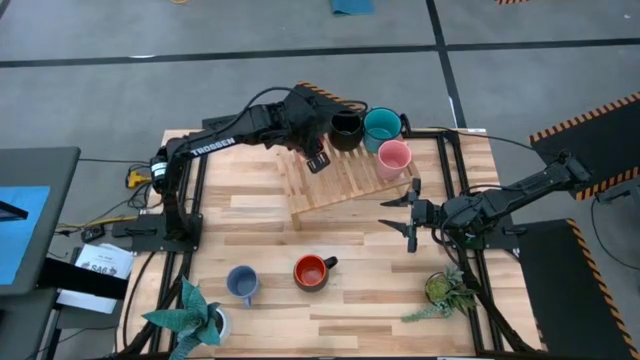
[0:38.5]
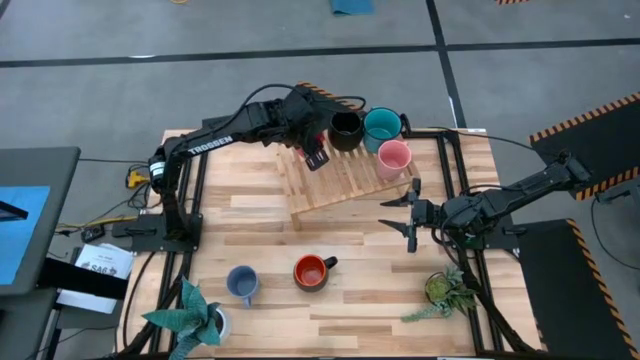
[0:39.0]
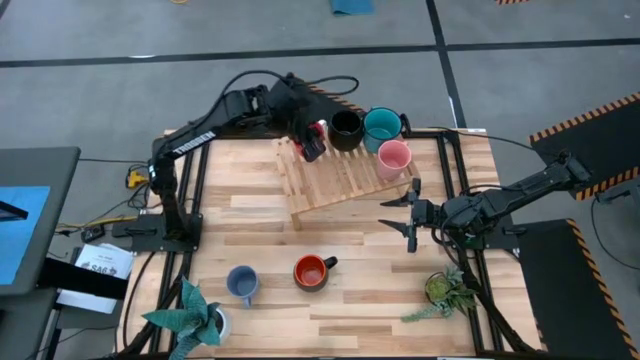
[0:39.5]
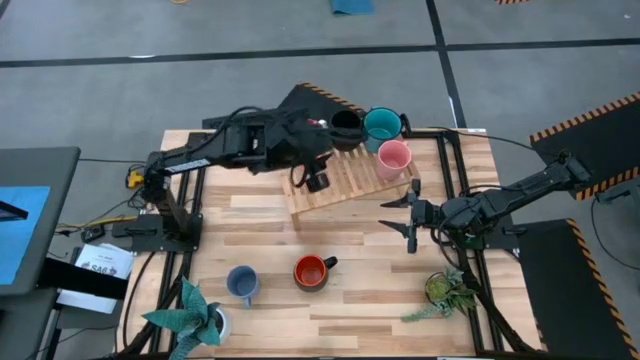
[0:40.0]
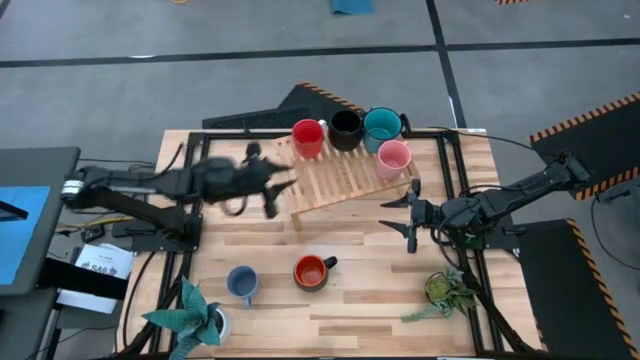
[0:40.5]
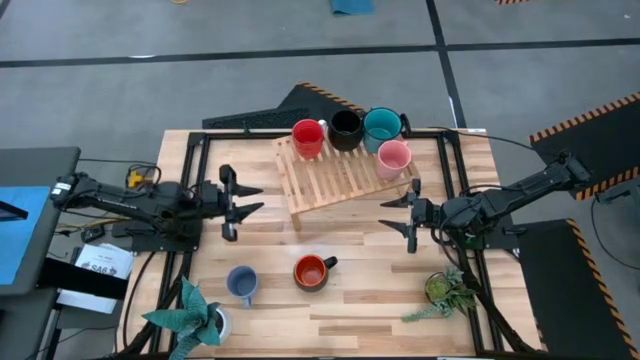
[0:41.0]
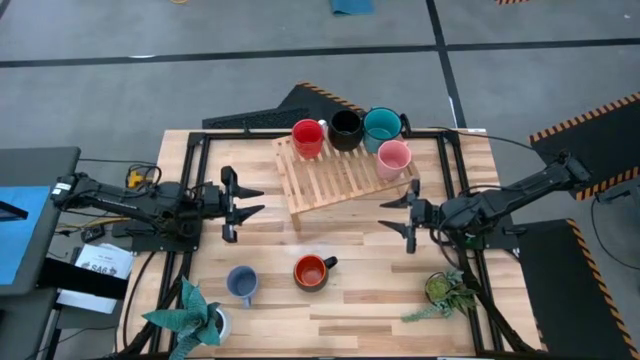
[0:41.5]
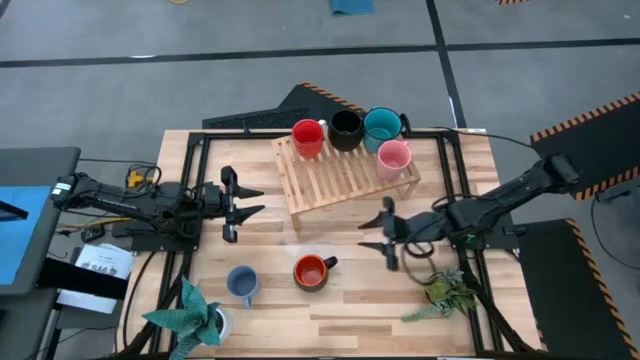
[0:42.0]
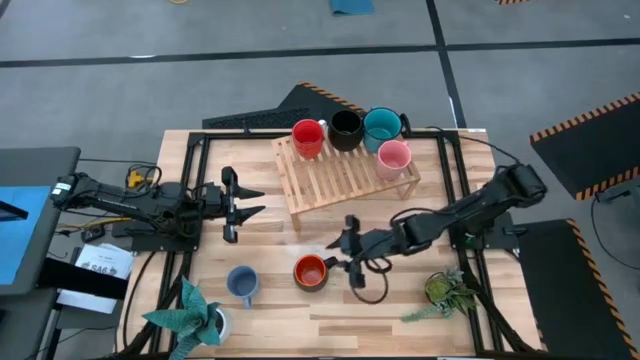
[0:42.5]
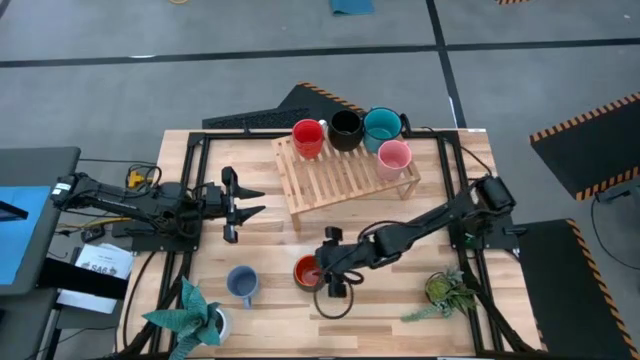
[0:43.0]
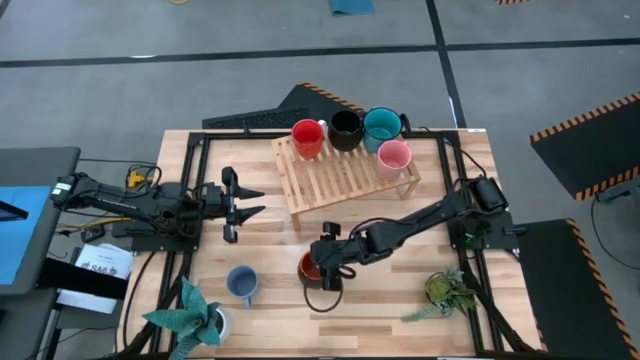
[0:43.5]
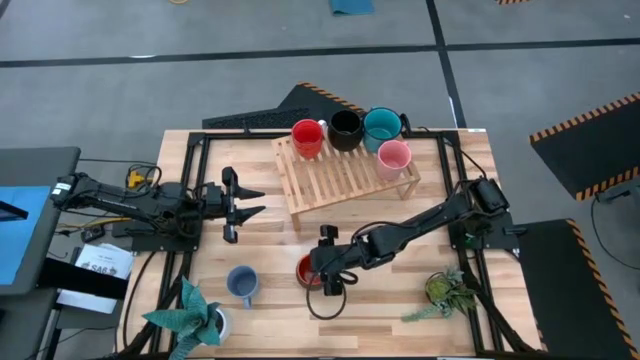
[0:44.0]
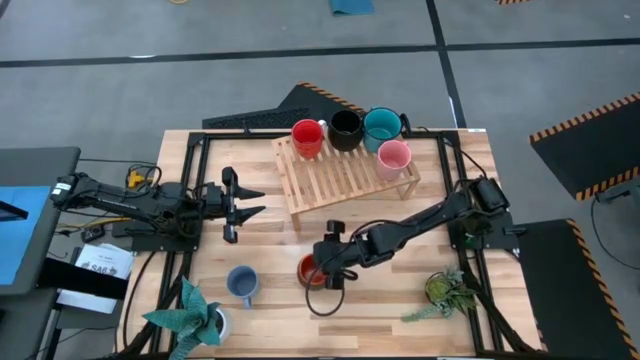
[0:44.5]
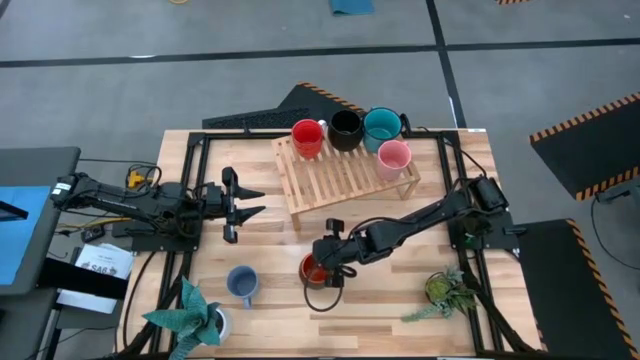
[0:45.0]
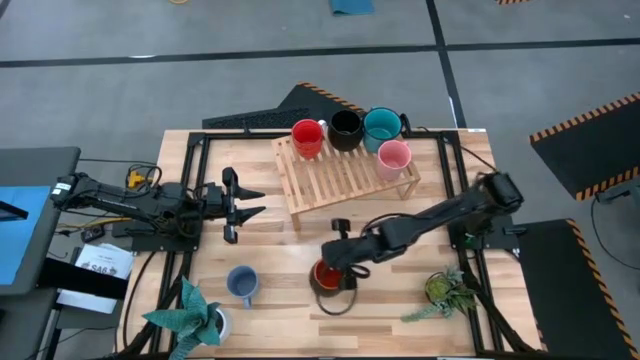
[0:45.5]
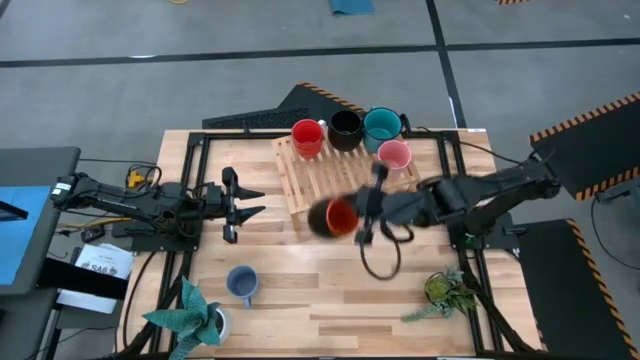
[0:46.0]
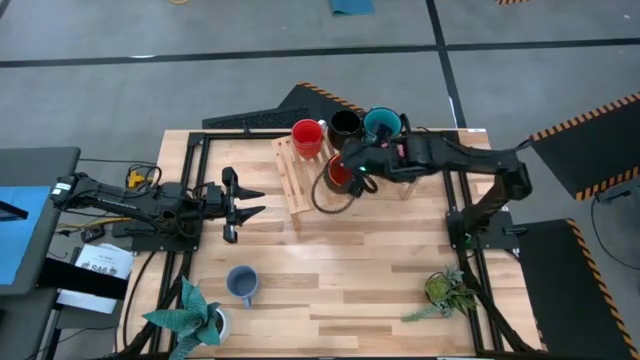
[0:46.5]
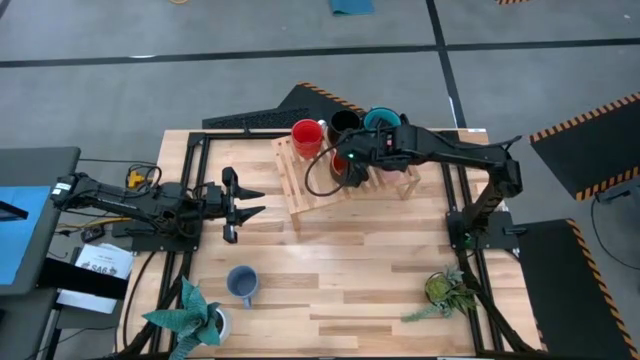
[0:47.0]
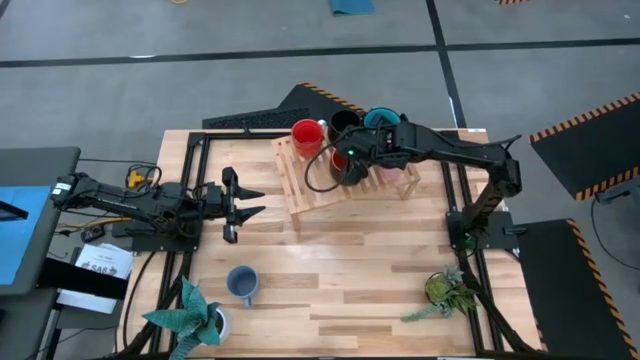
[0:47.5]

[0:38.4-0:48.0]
Task: Place coffee mugs
Put the black and orange mug on the shelf

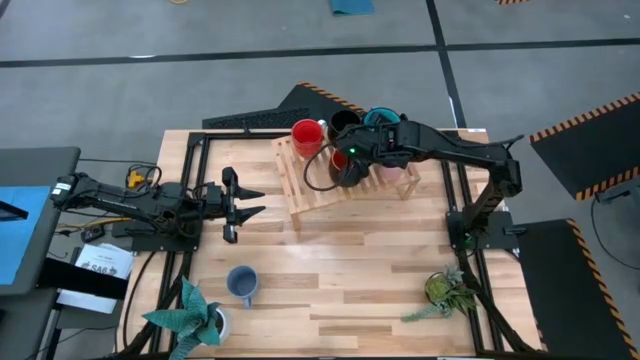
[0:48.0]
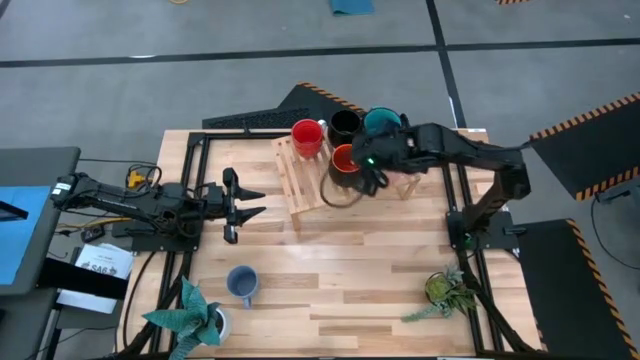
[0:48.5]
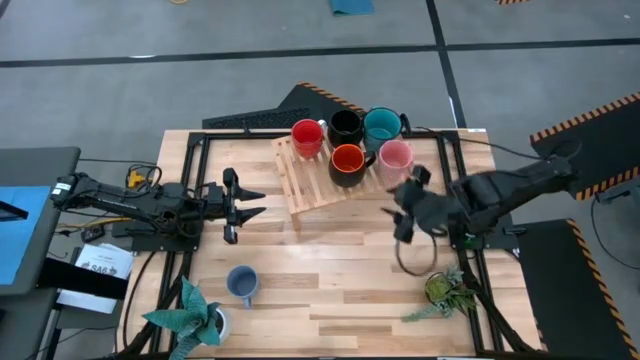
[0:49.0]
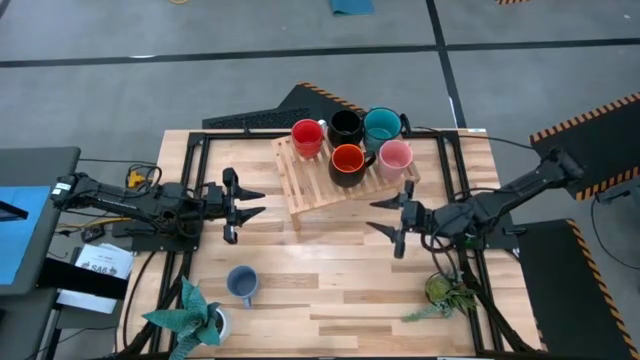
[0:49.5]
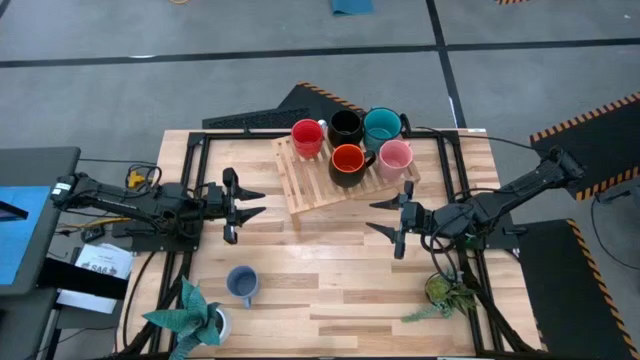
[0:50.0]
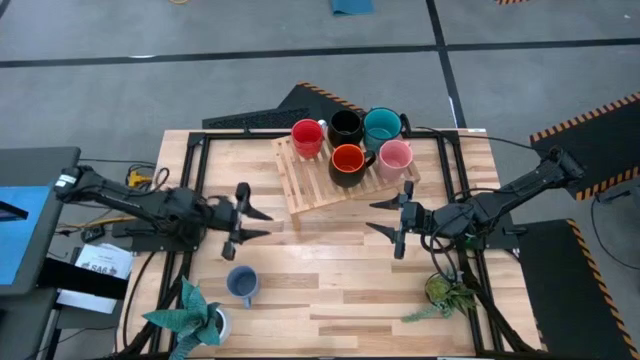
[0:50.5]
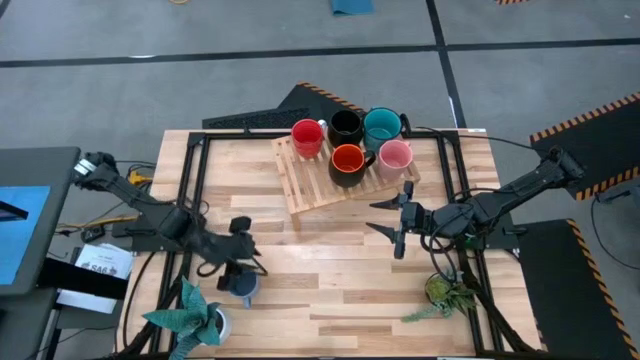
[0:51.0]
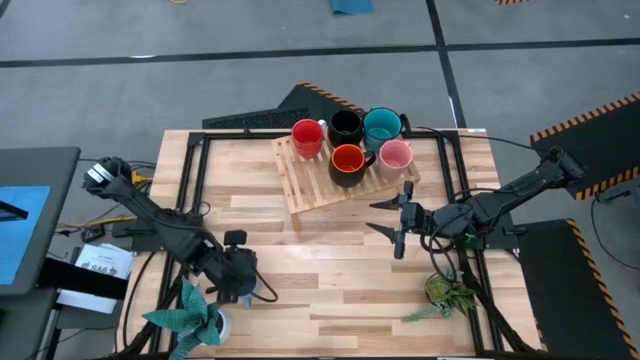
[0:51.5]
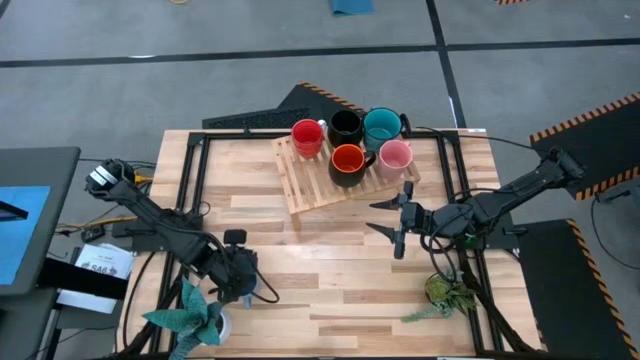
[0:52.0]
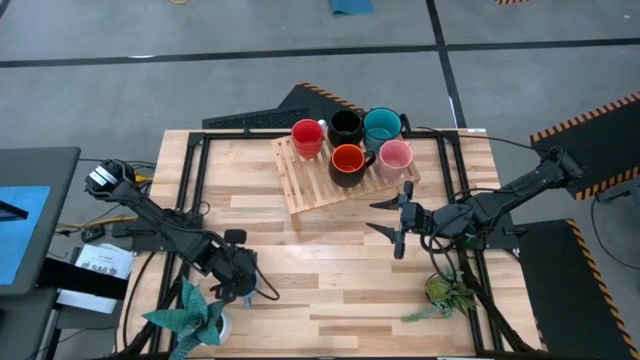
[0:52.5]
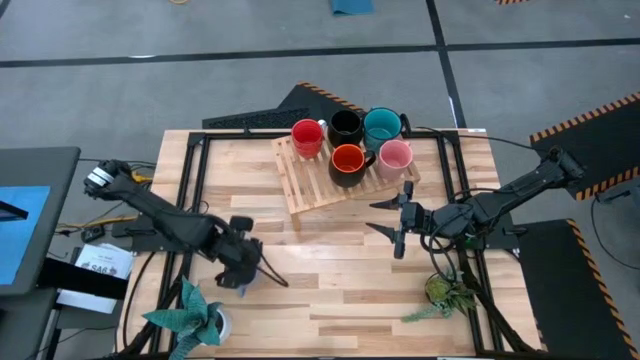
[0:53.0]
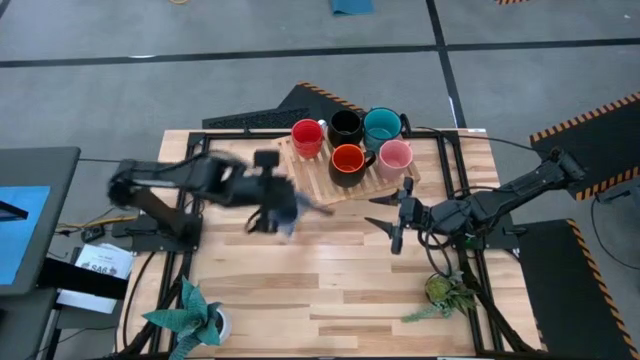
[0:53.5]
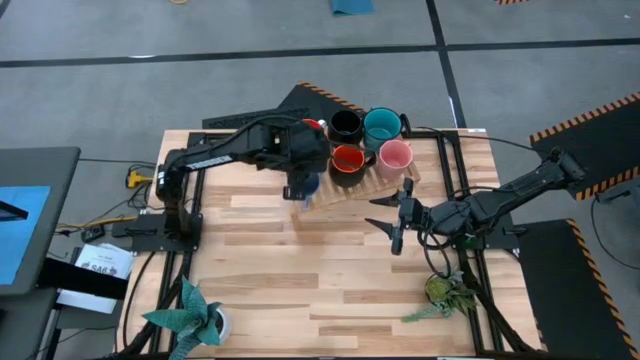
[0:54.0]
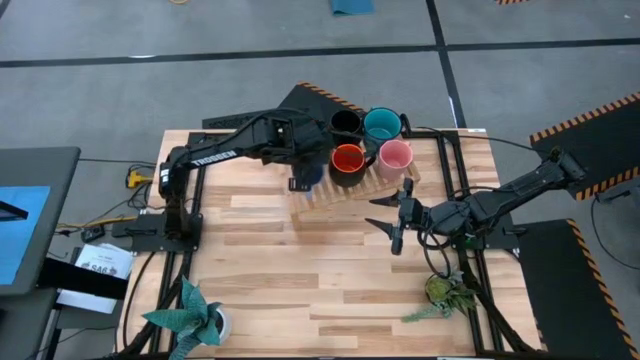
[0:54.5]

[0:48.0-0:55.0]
Put the blue mug on the shelf

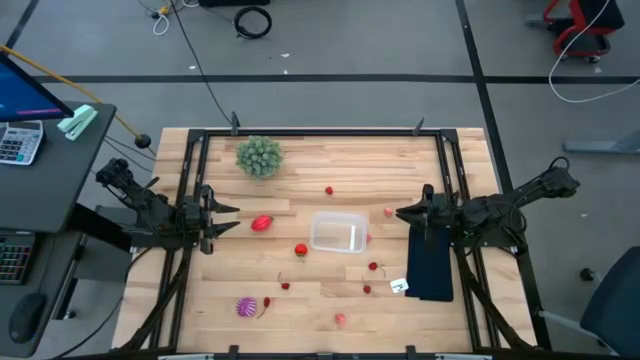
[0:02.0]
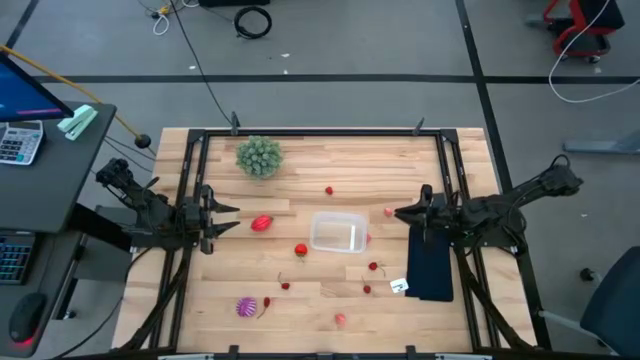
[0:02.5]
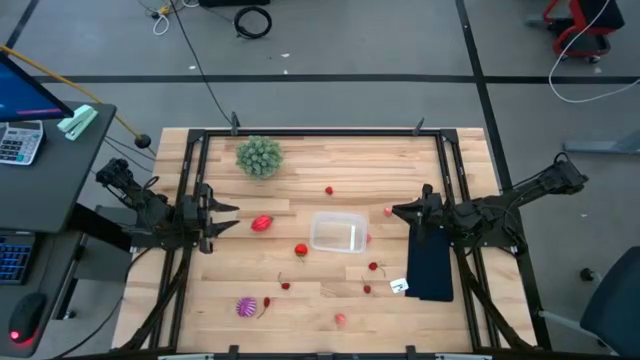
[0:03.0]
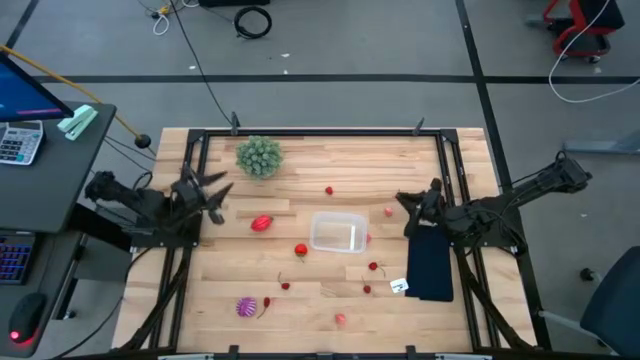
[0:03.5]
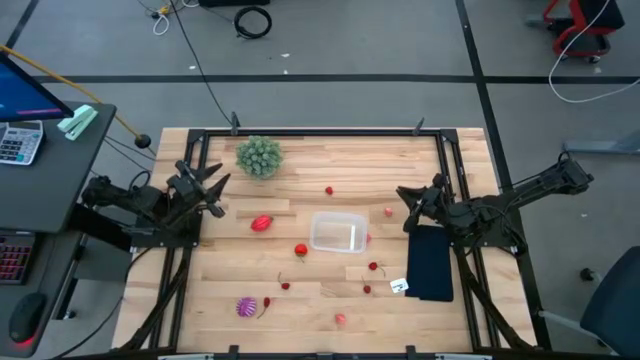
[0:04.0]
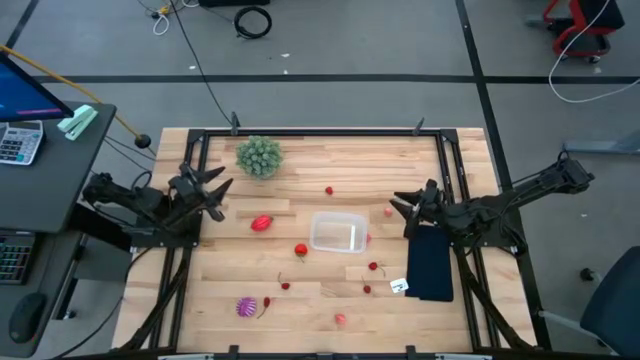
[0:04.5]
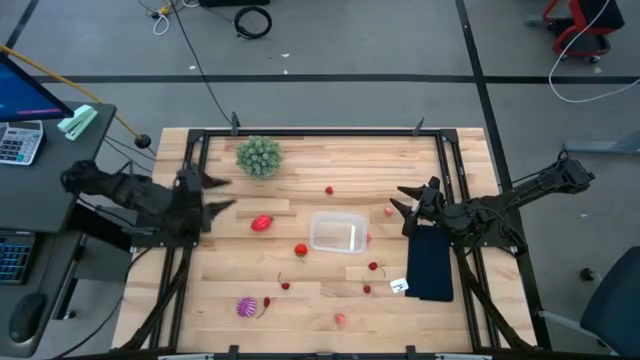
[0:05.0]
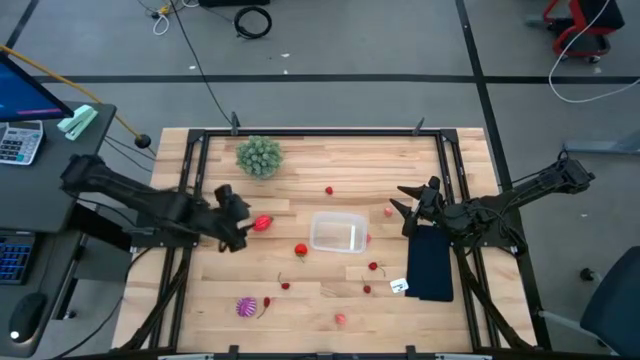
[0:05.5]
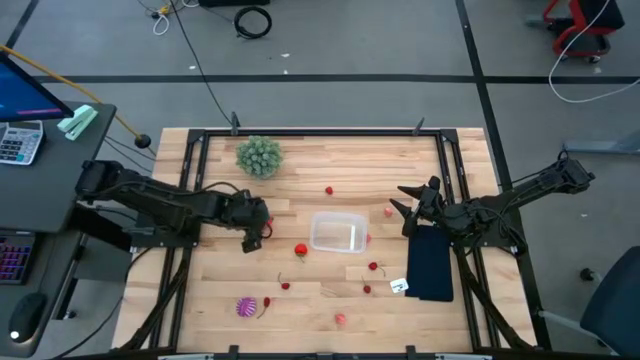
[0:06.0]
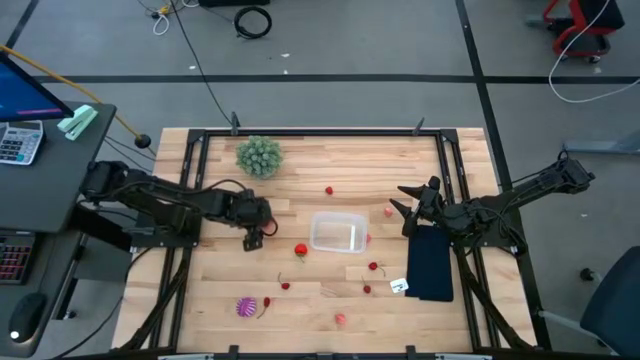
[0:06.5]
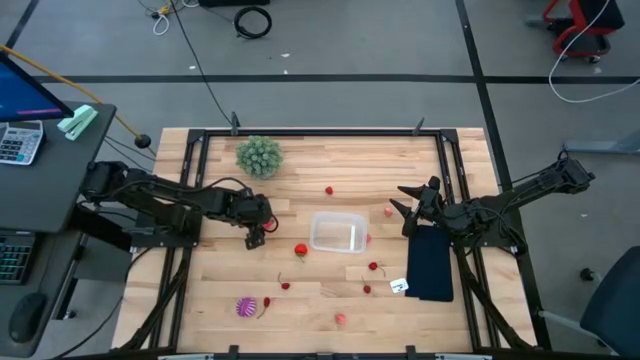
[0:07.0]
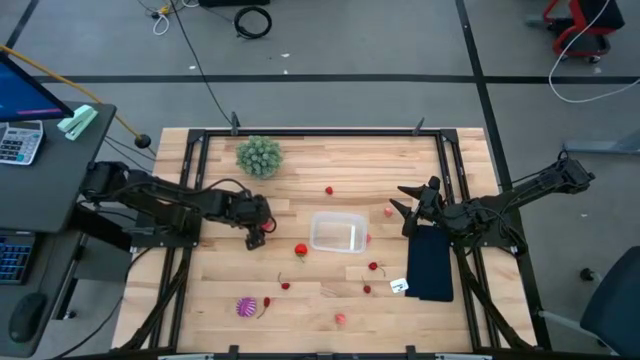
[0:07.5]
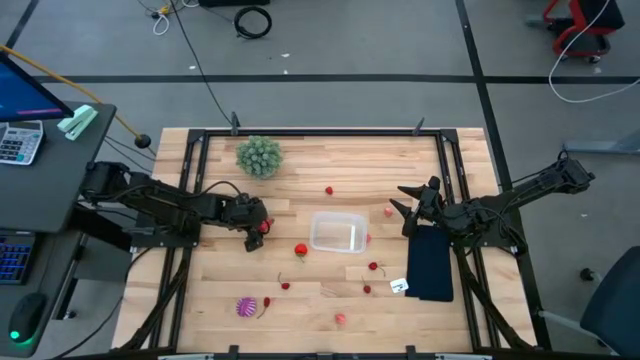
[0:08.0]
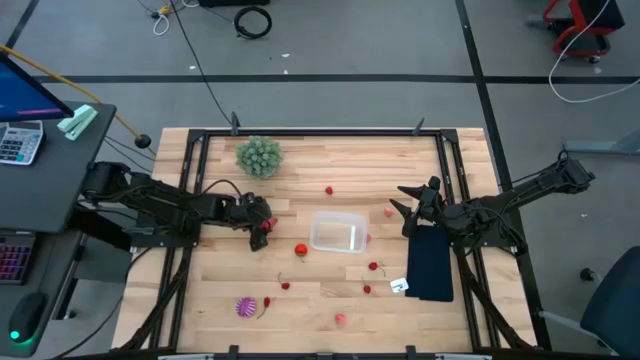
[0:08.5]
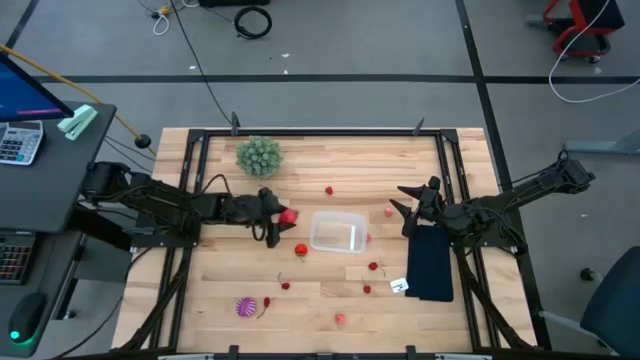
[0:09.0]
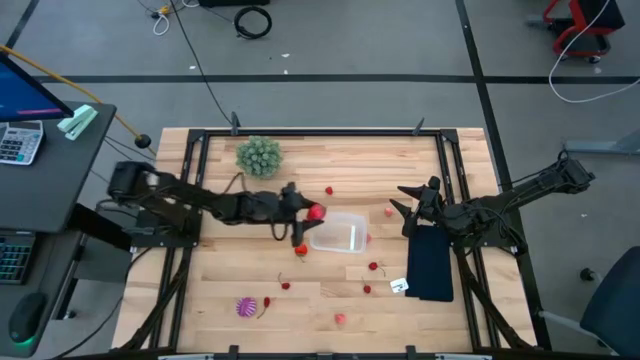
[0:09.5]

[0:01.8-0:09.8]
Task: Pick and placing Produce into tupperware
Put the red dragon fruit into the transparent bin
